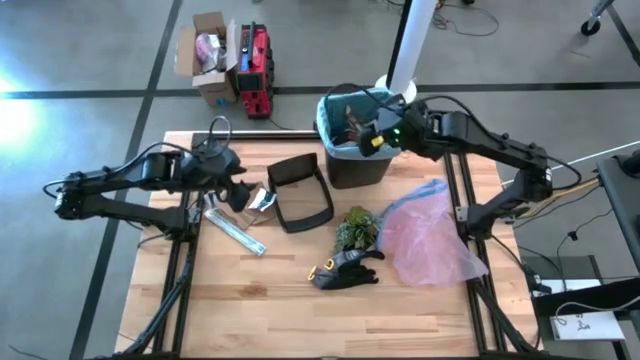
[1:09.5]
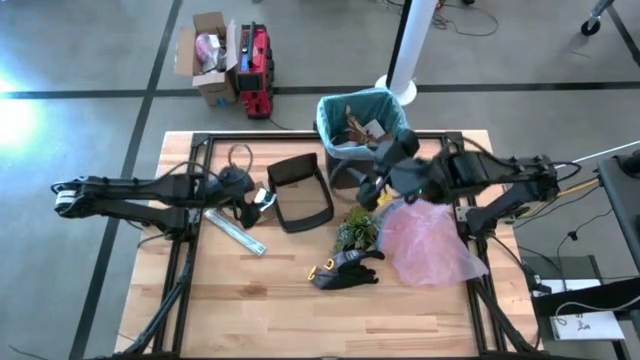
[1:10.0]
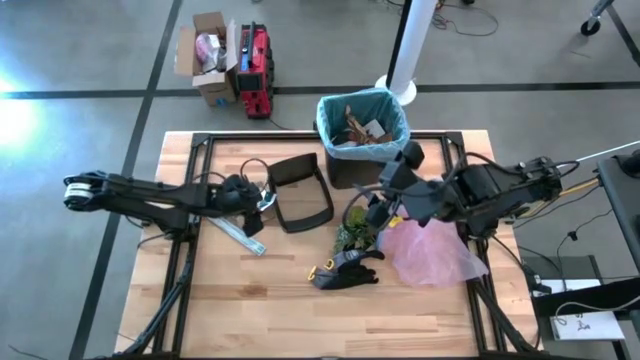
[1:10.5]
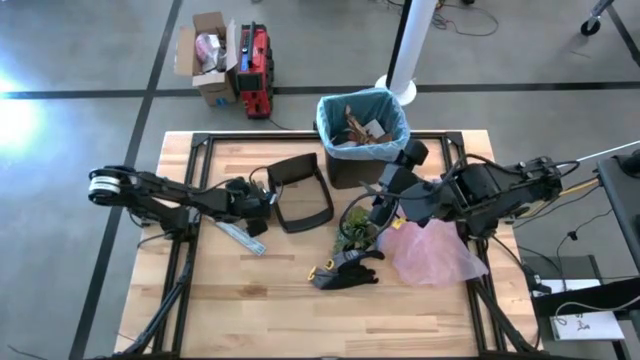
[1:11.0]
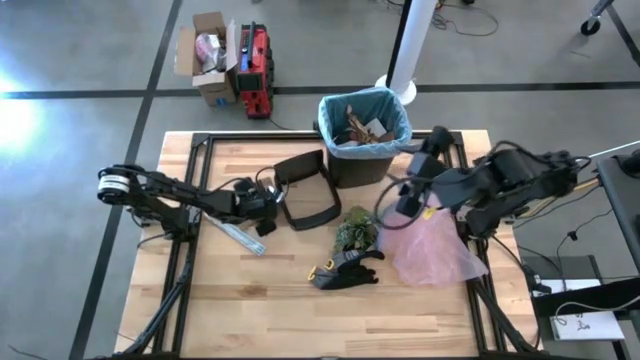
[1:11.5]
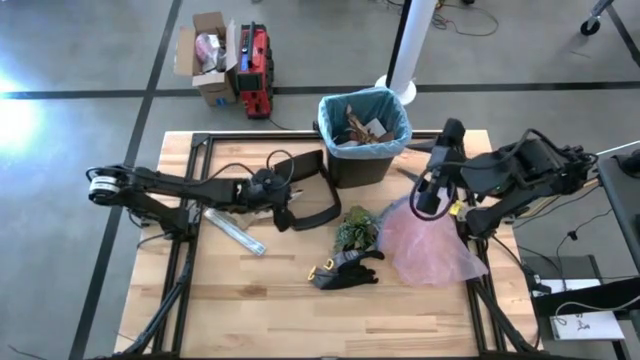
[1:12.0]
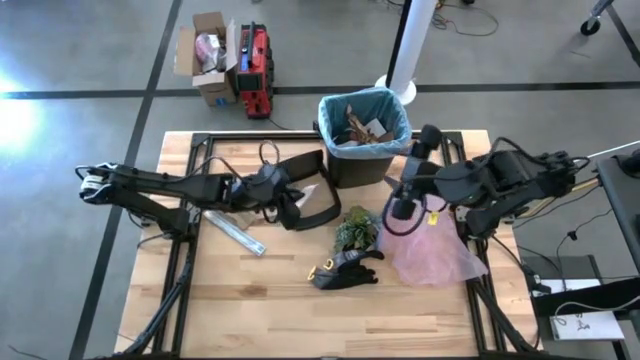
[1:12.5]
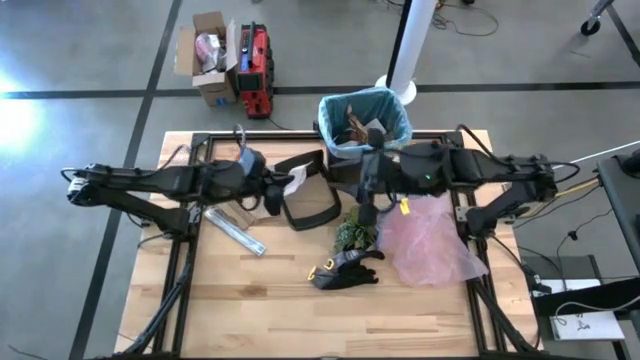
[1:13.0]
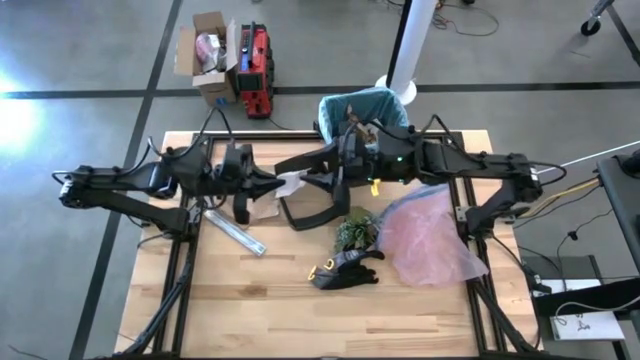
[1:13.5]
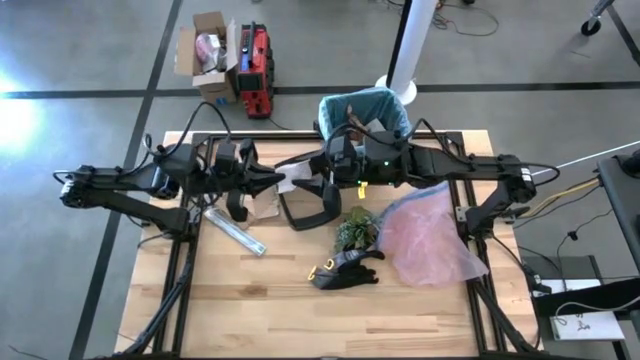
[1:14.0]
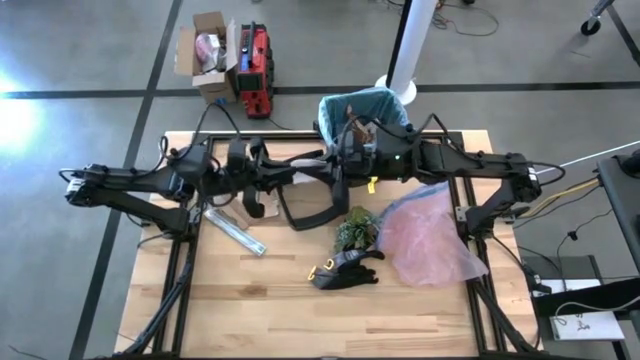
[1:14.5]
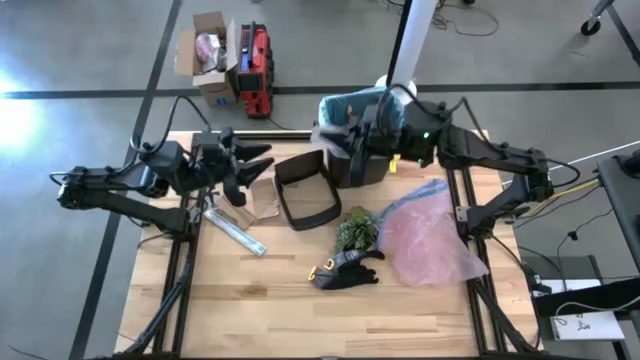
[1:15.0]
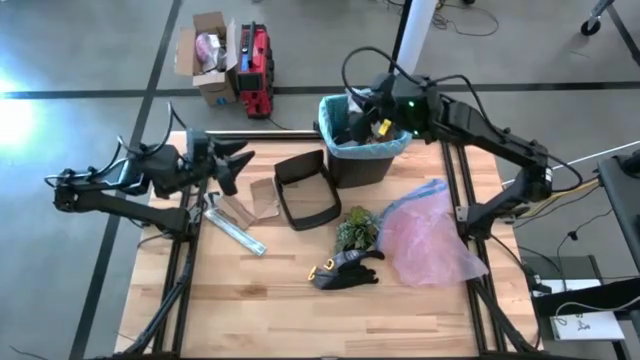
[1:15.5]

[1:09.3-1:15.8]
Task: place trash/remove bag and relplace
Put the white paper into the trash bin

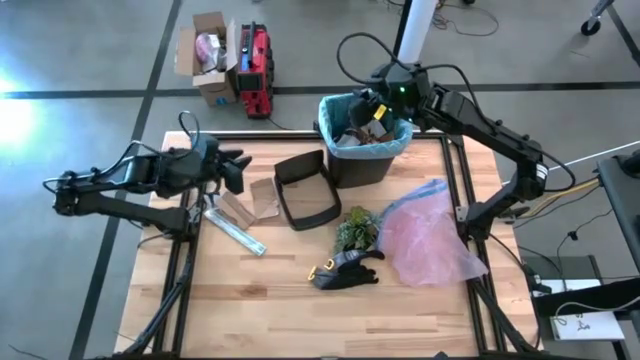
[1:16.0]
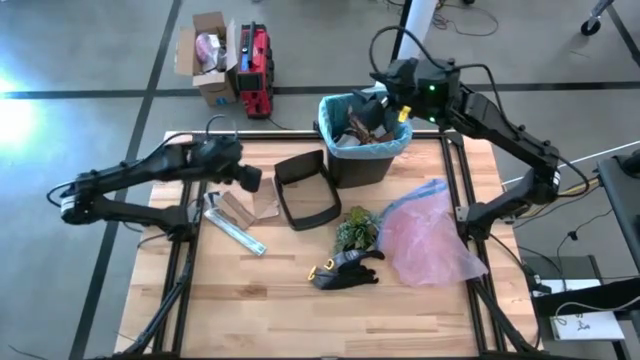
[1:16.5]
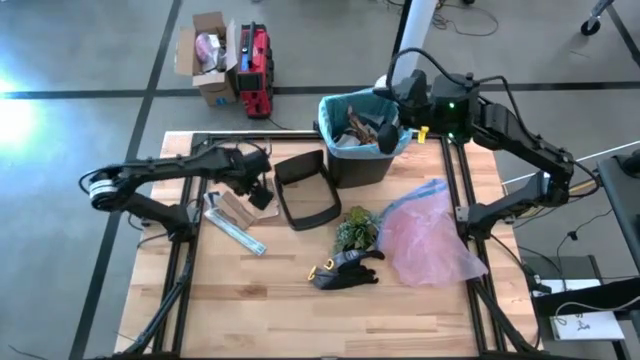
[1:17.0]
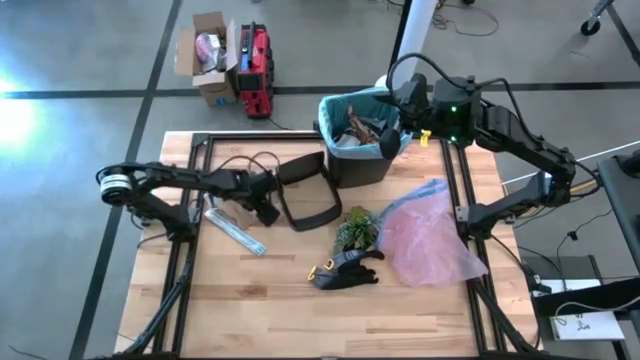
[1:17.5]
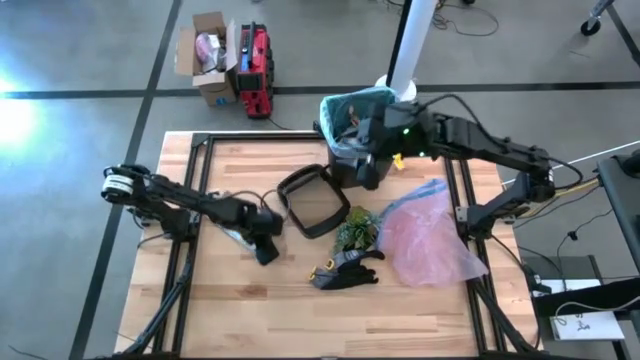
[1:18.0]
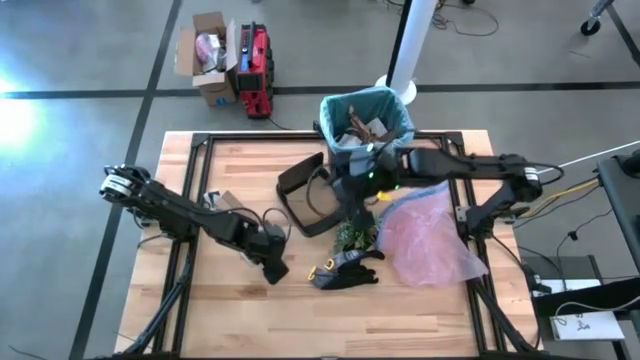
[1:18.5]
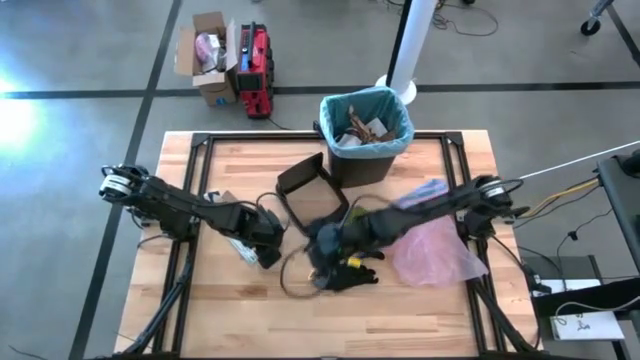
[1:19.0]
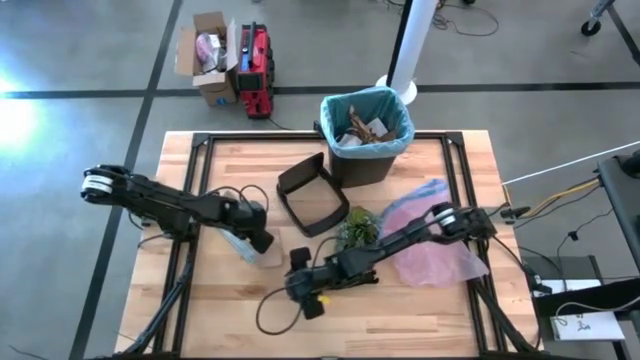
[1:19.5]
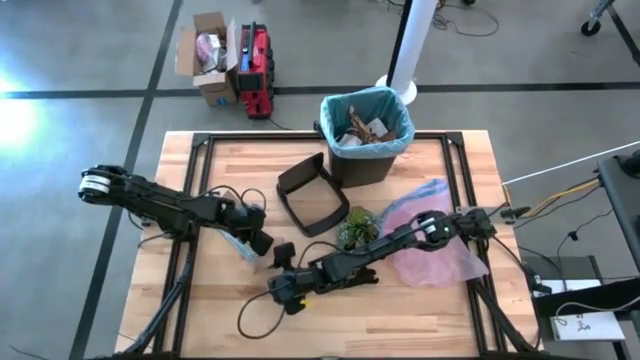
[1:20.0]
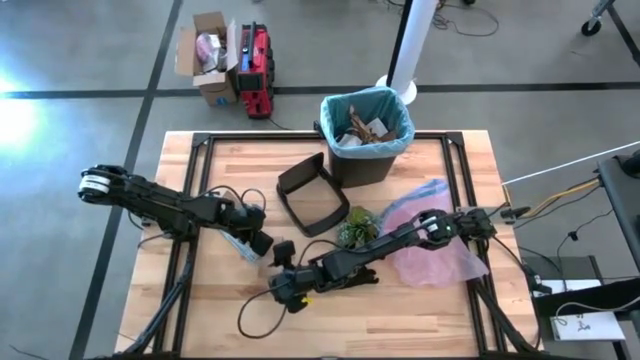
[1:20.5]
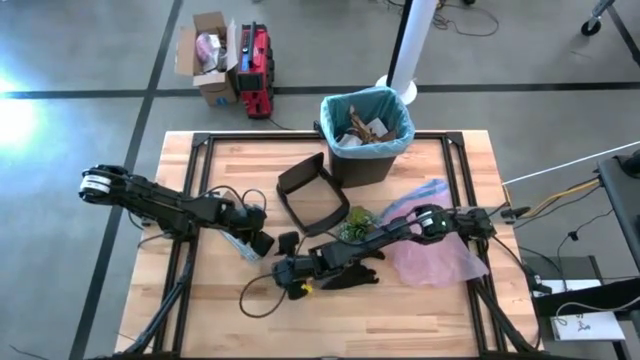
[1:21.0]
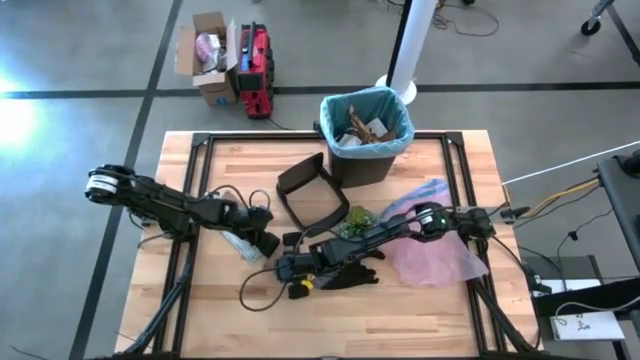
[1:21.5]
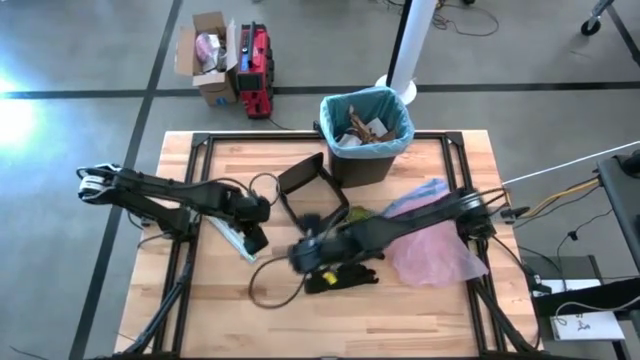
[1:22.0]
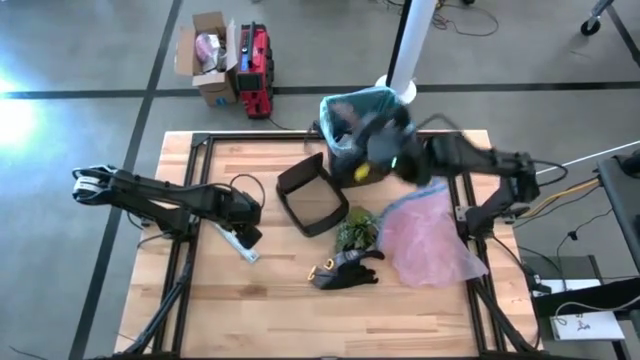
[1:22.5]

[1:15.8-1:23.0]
Put the brown cardboard into the trash bin

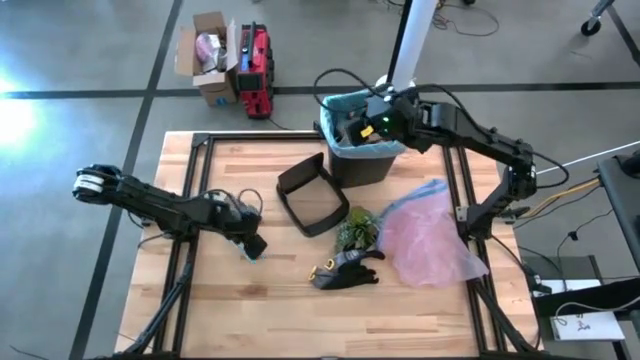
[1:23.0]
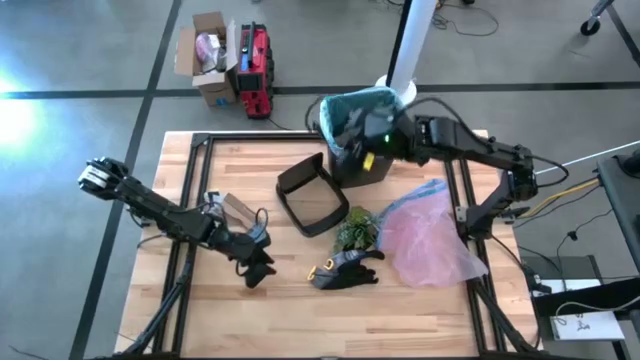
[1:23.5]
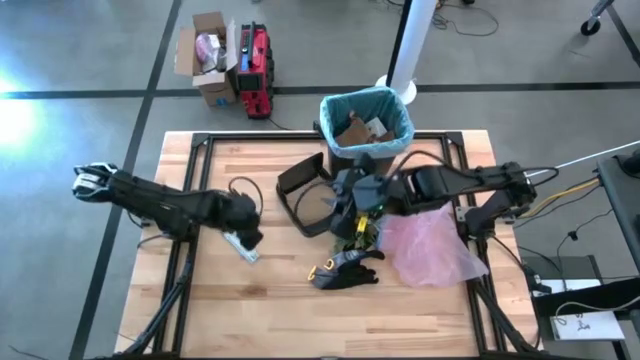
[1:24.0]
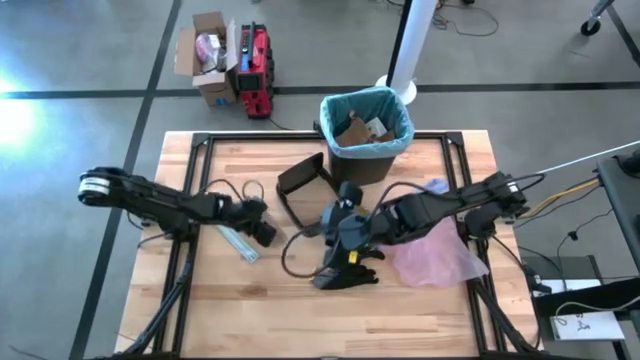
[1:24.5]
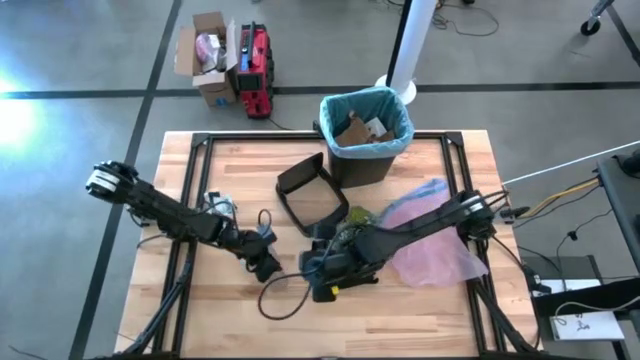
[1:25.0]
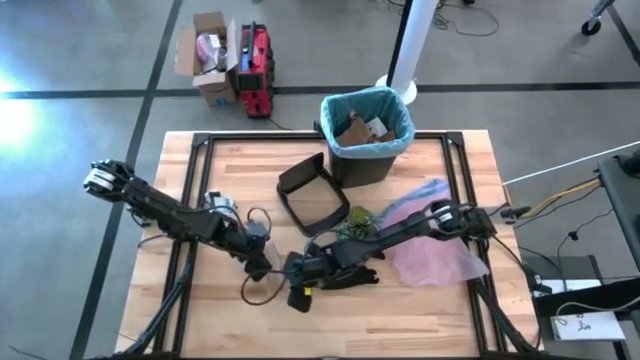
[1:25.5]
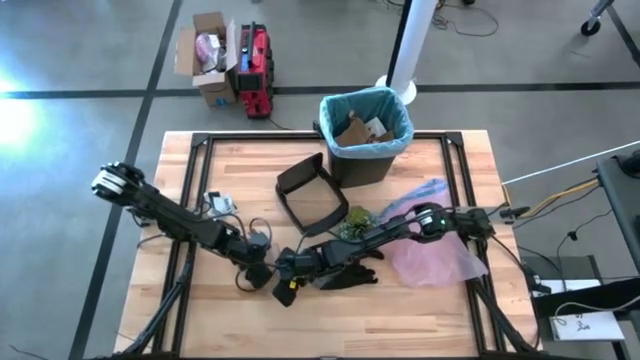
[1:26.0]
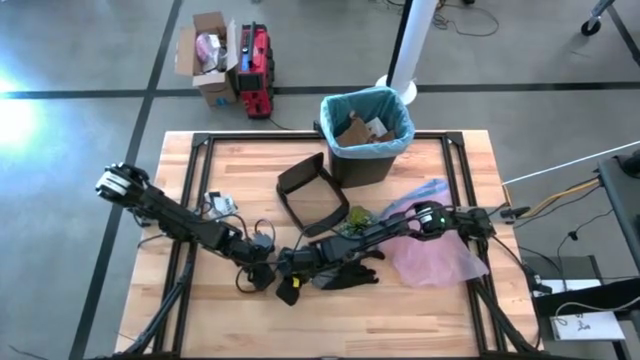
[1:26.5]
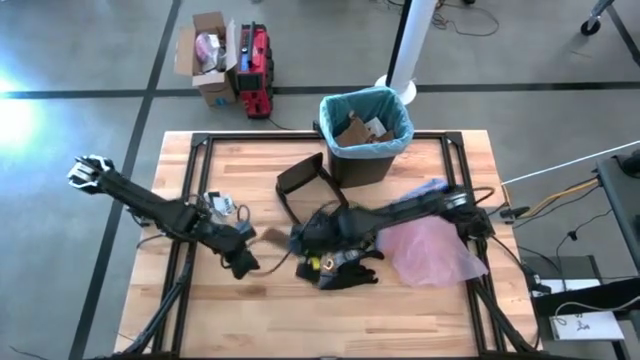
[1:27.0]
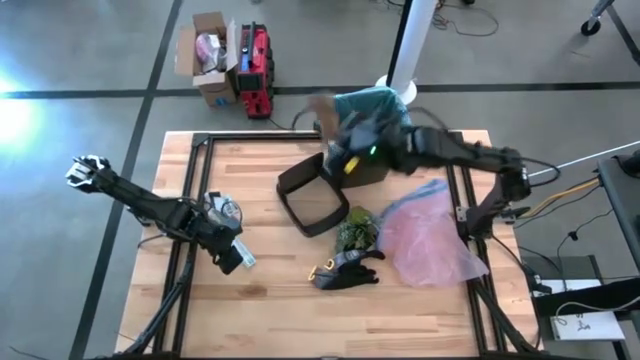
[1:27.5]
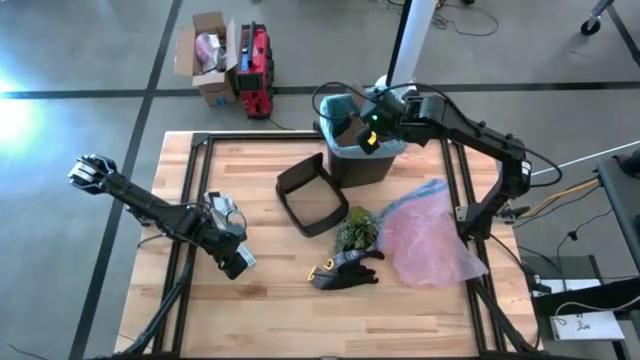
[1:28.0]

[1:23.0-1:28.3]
Put the brown cardboard into the trash bin

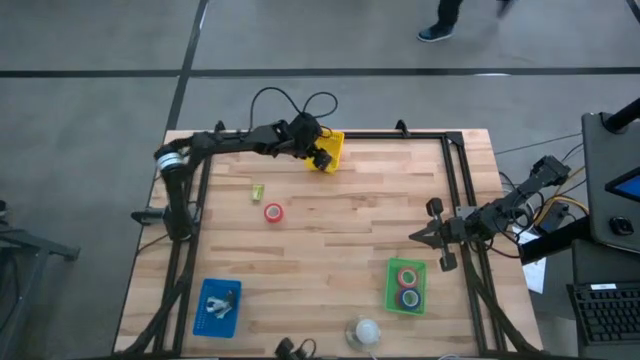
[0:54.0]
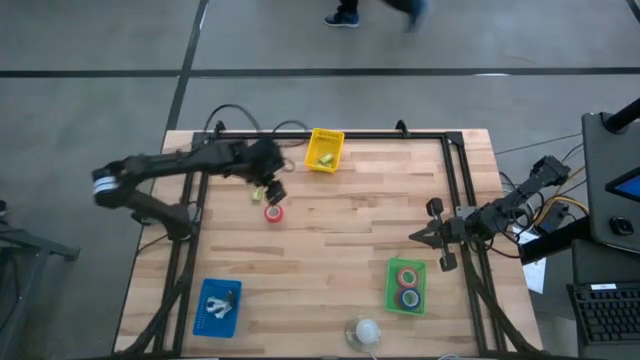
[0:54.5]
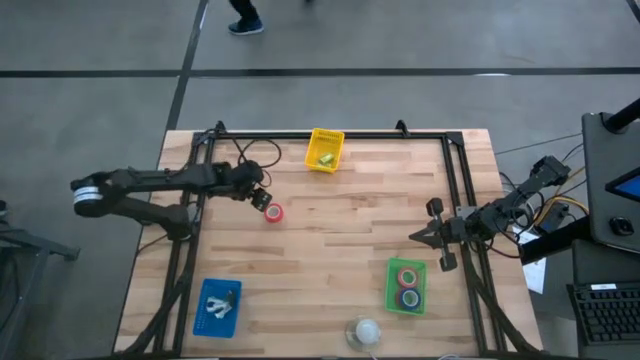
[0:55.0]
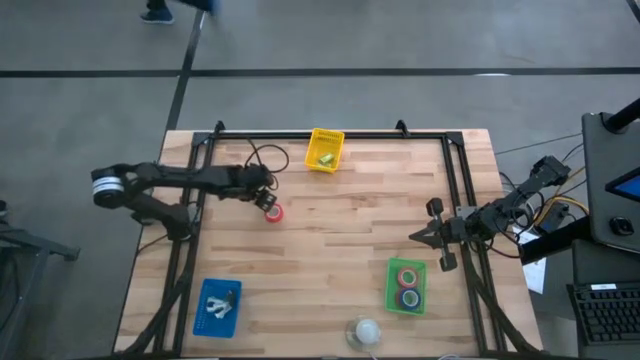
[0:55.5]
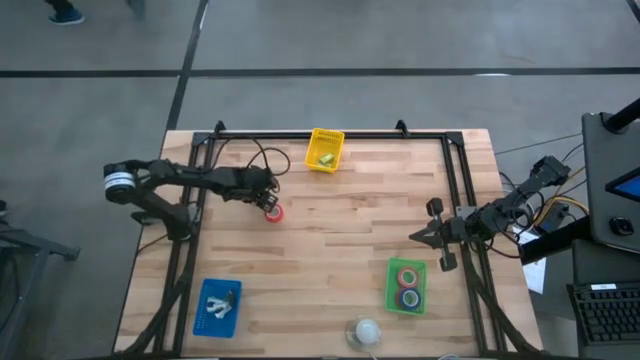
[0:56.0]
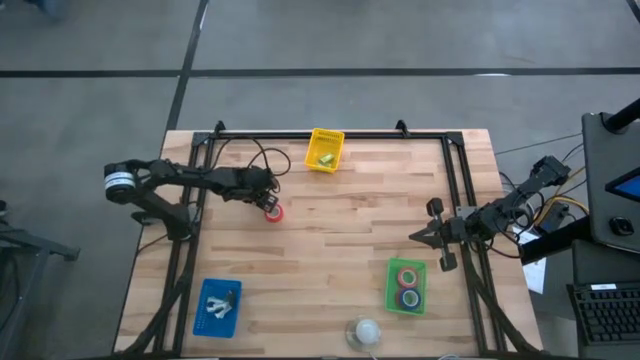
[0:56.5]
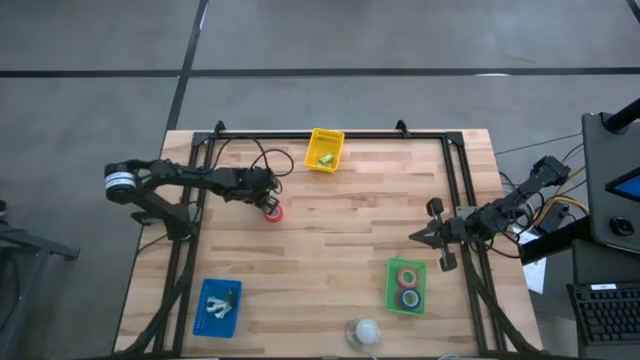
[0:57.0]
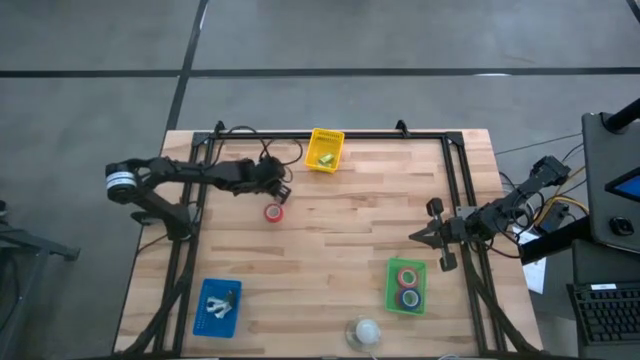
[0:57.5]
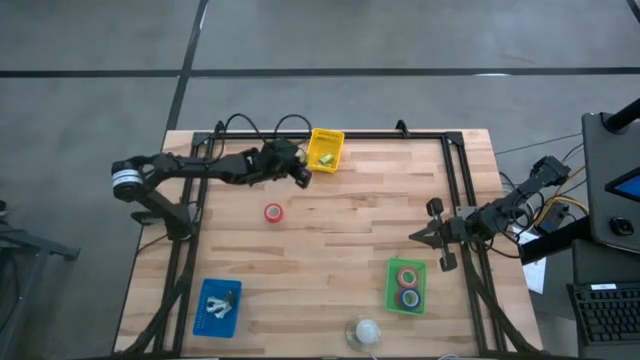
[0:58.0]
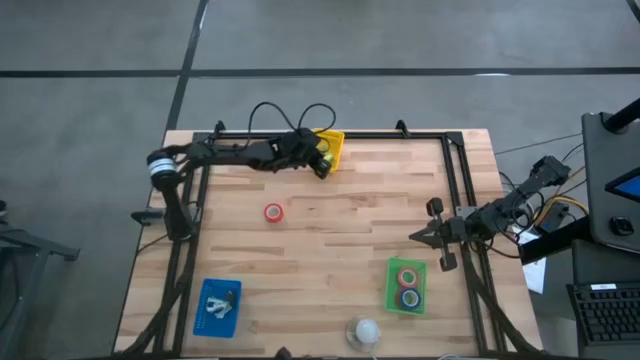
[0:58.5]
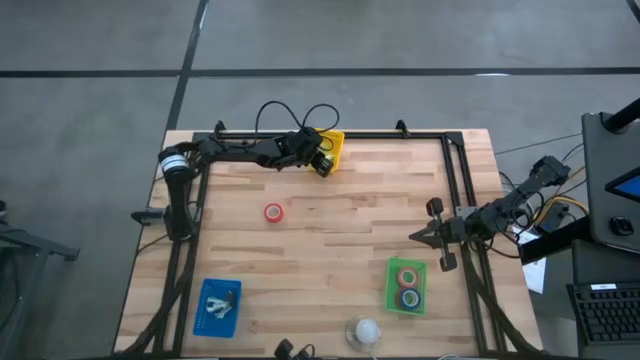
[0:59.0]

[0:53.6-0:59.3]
Task: Pick and place Stapler, Stapler remover, tape
Put the staple box into the yellow bin
